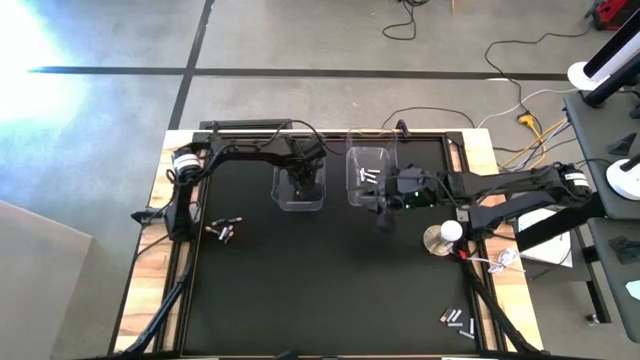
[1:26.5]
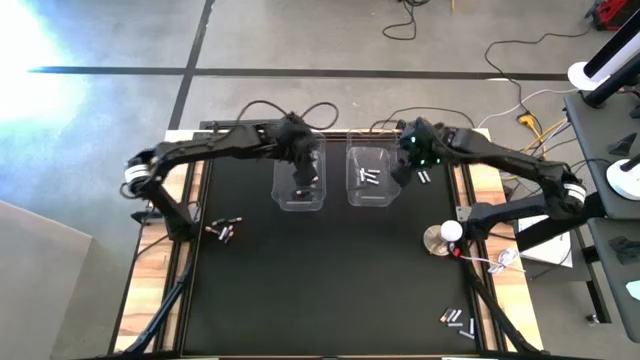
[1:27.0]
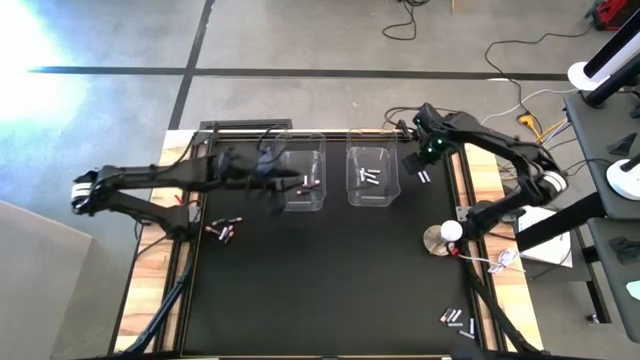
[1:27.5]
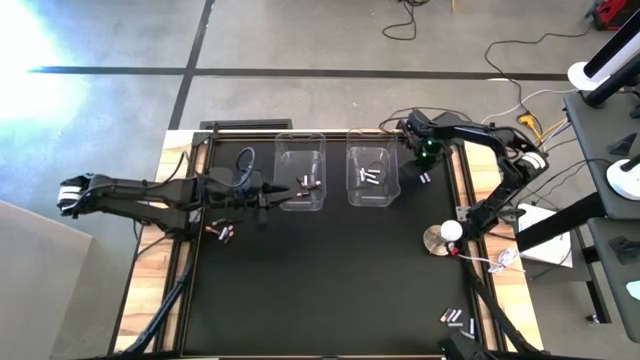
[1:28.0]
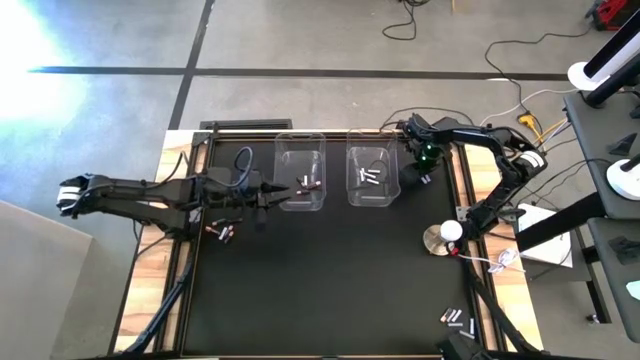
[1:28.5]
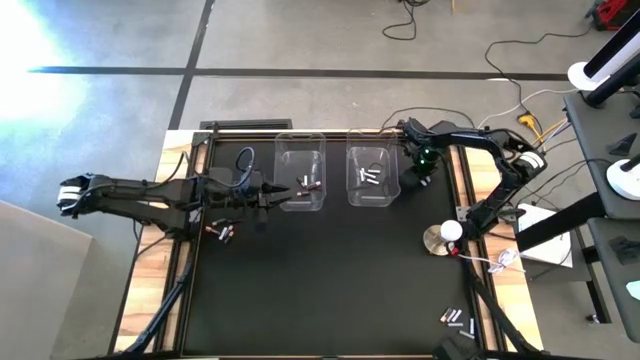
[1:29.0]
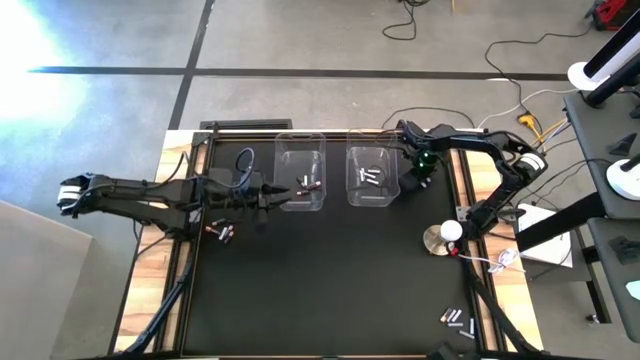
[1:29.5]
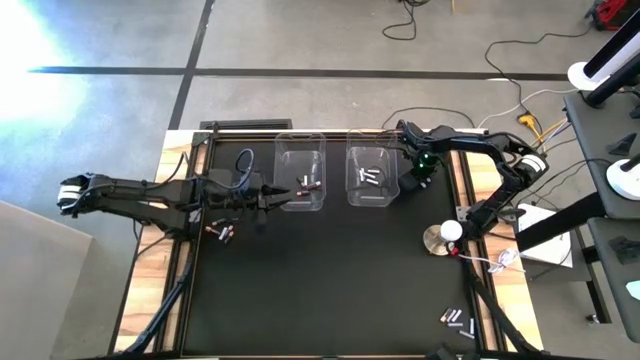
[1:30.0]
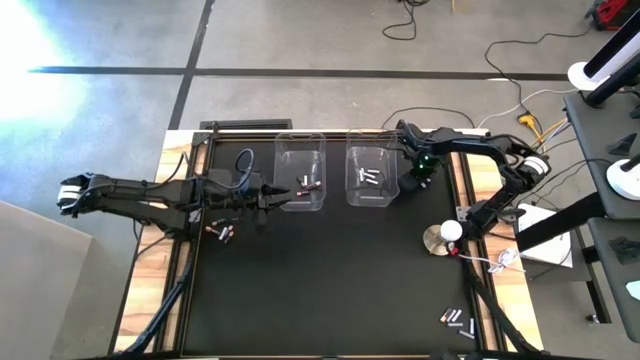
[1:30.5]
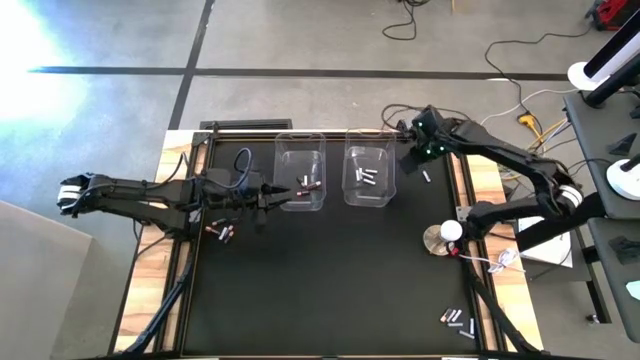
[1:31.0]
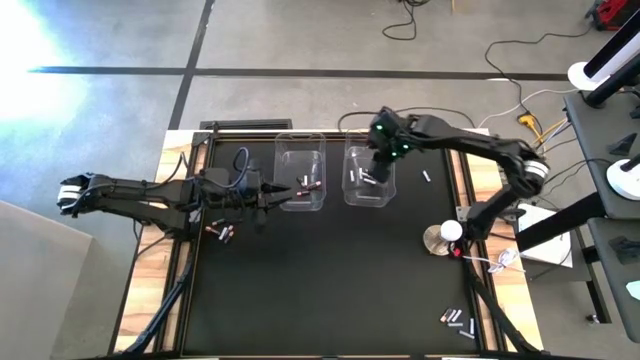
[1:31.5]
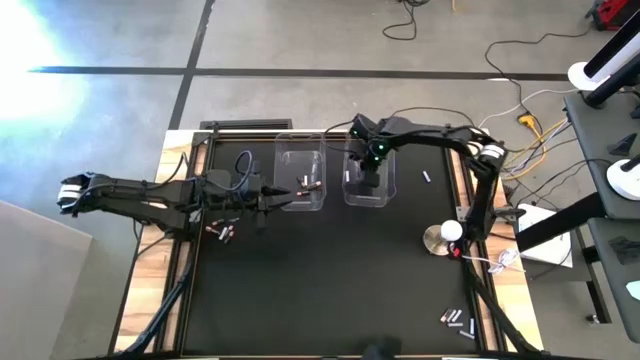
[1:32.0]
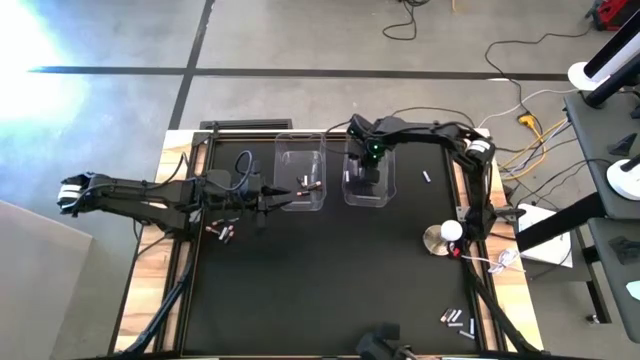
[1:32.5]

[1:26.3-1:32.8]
Task: Sort batteries
Put the white battery into the right transparent bin

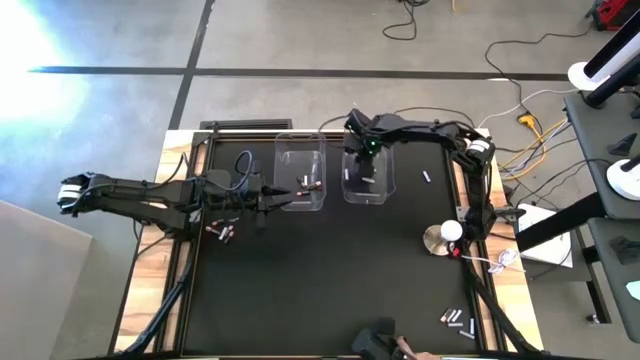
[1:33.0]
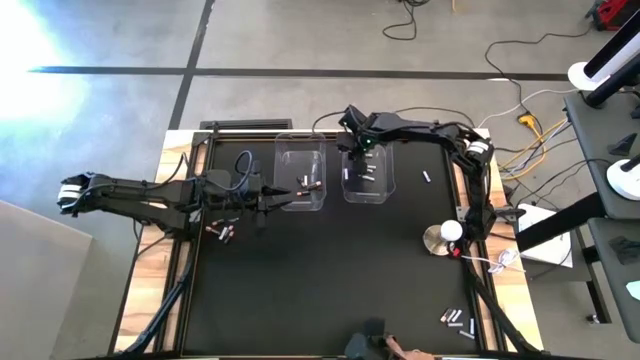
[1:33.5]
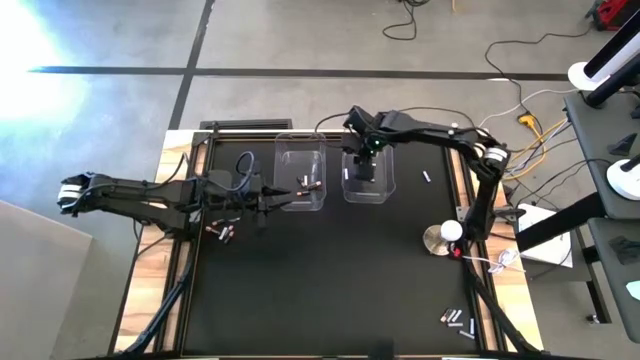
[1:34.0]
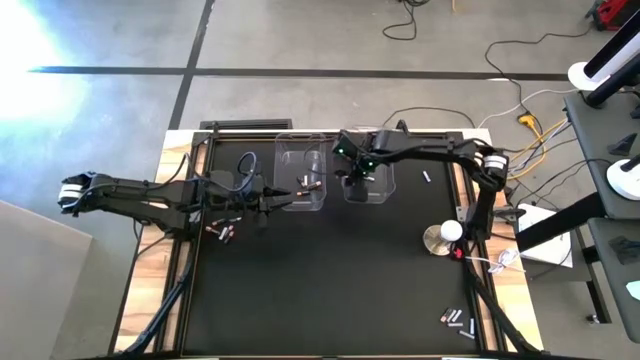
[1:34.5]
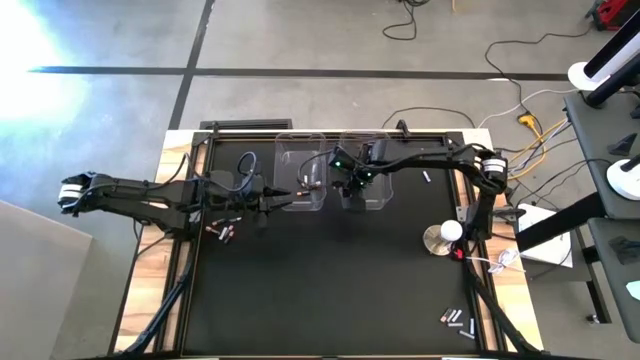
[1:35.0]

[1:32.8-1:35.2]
Adjust the right transparent bin

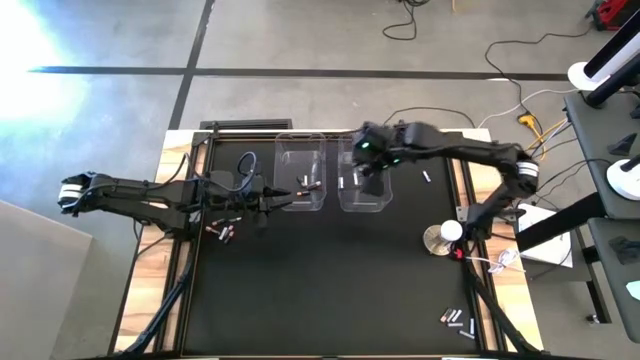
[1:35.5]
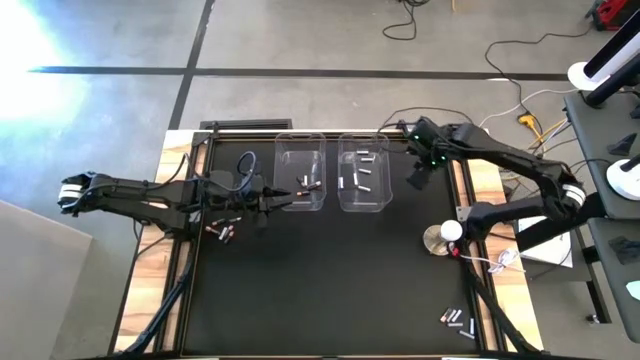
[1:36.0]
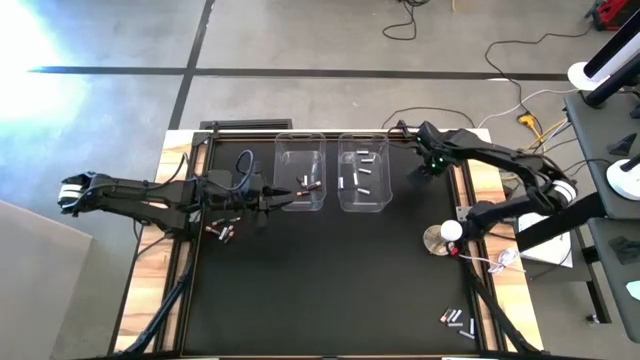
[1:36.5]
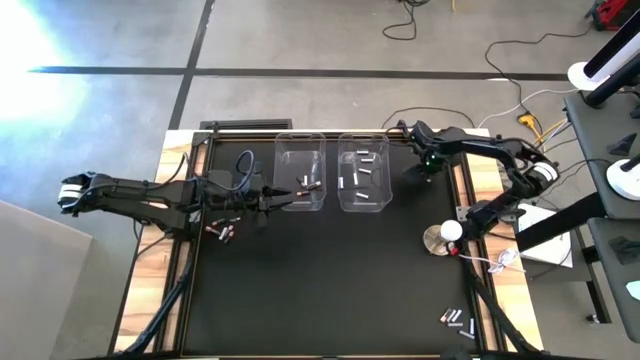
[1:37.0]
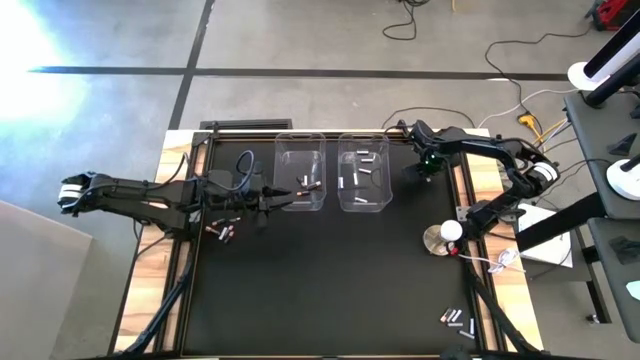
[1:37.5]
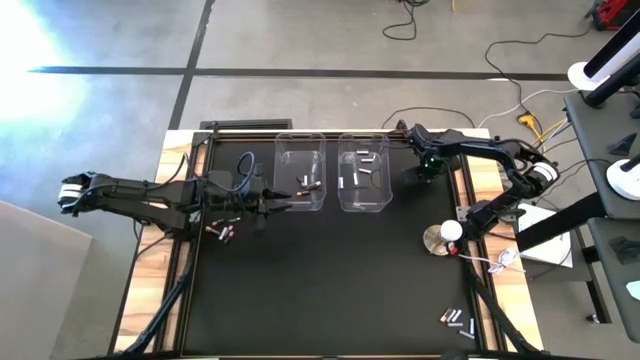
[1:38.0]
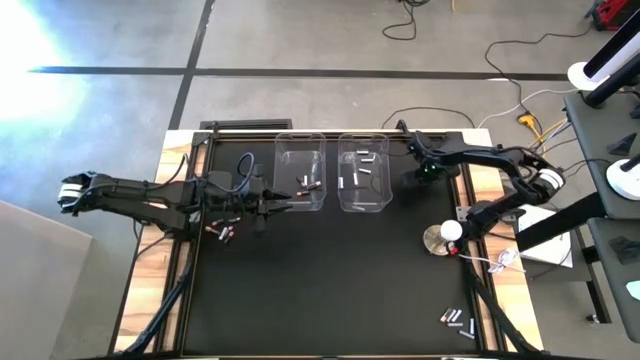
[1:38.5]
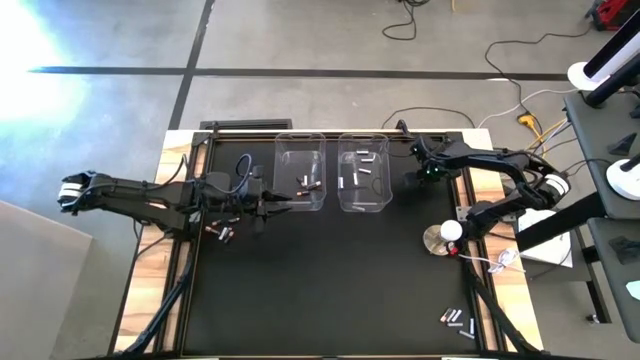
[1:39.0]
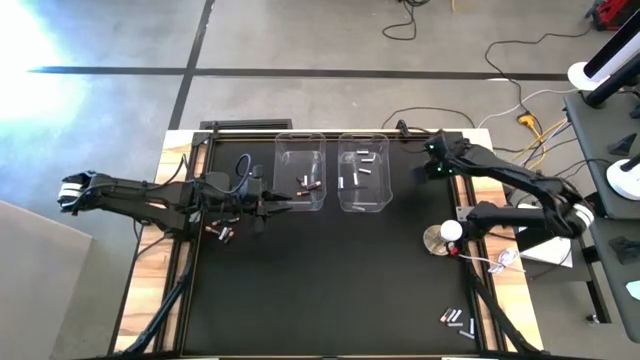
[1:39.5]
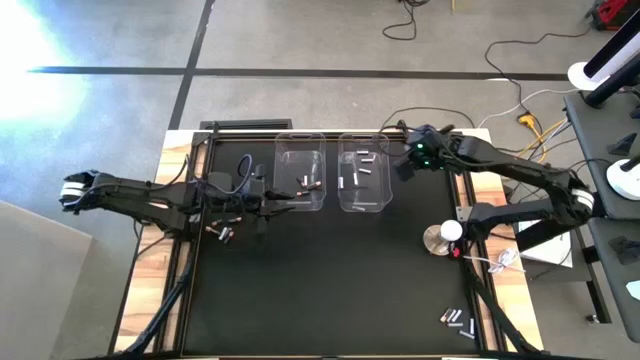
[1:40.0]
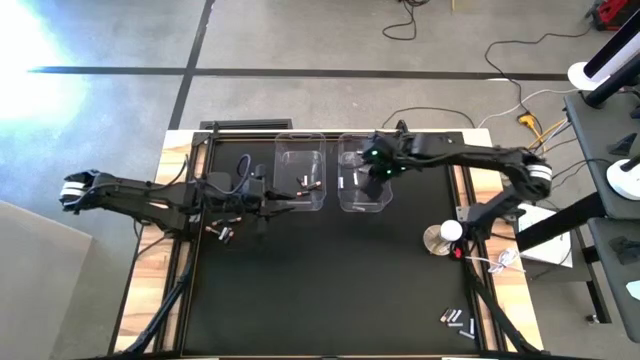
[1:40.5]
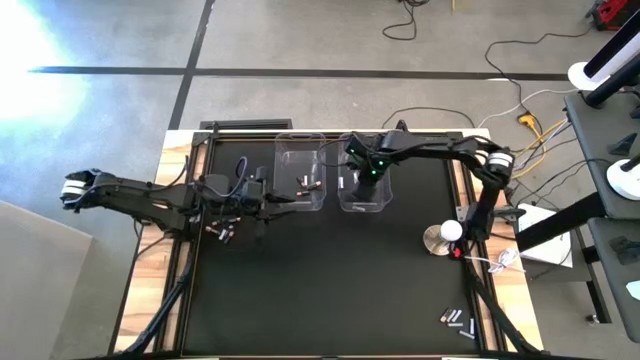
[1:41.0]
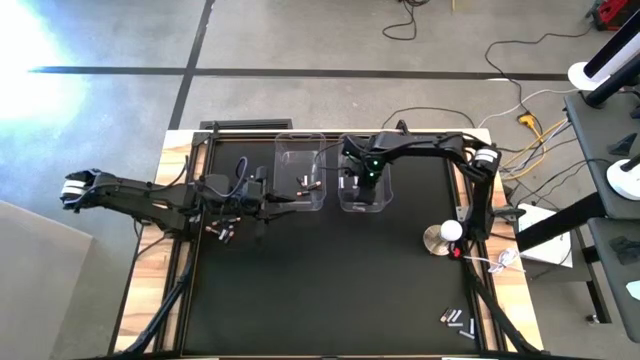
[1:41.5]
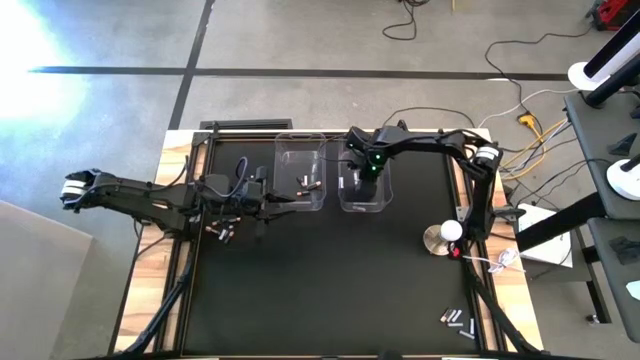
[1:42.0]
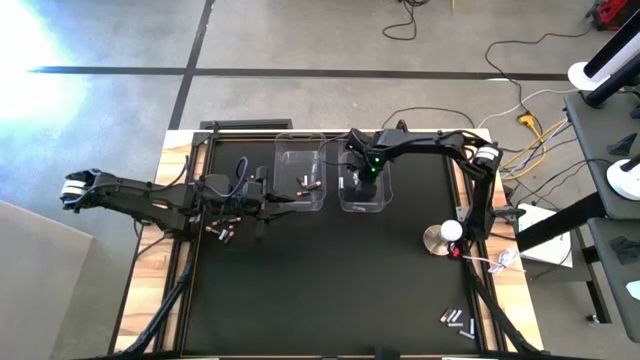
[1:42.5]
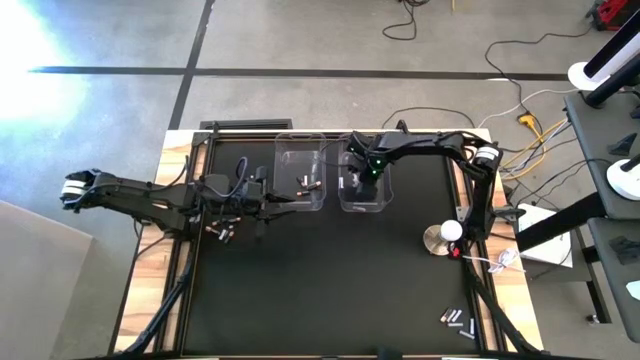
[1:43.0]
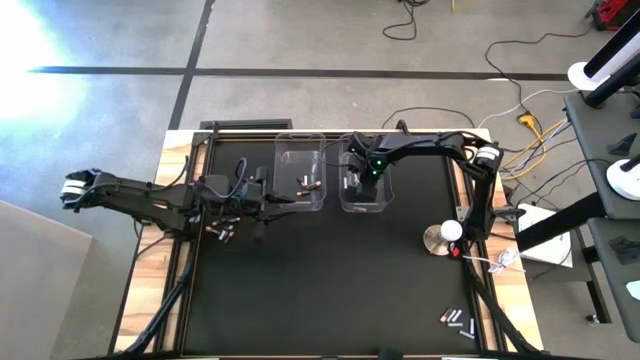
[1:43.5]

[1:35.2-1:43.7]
Put the white battery into the right transparent bin

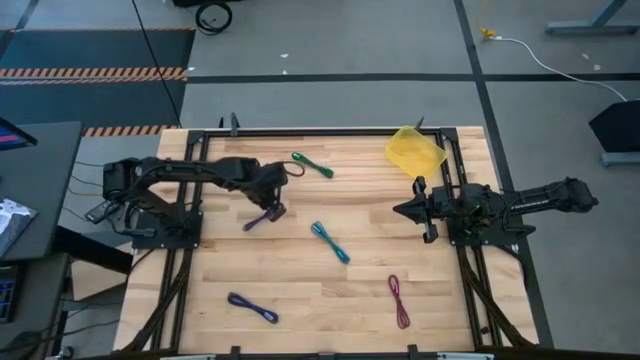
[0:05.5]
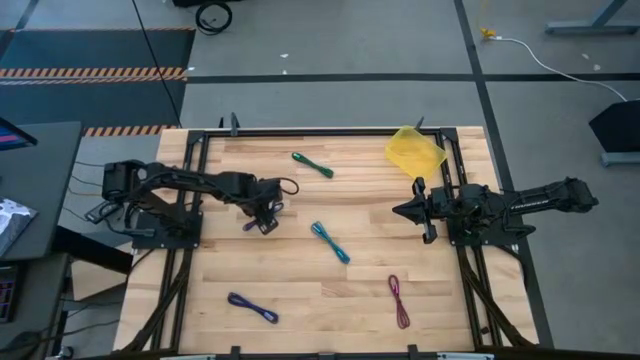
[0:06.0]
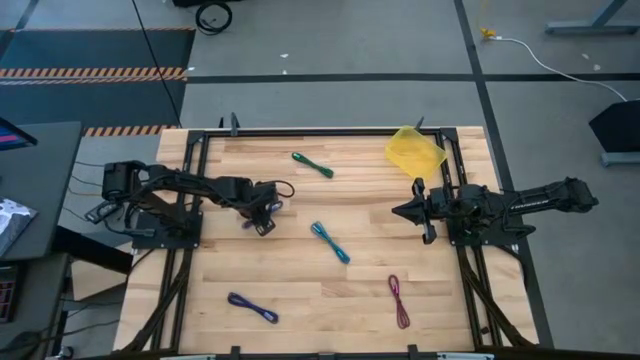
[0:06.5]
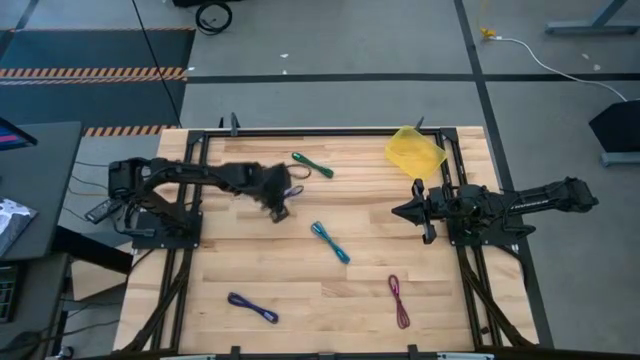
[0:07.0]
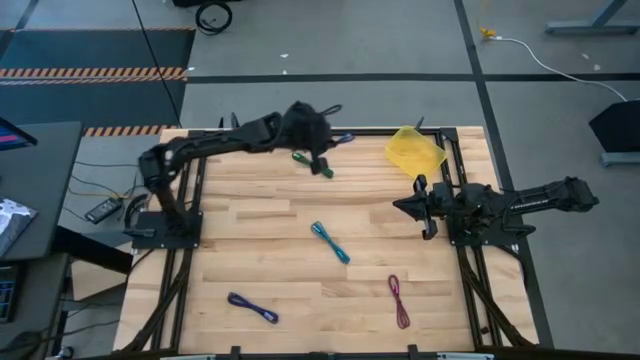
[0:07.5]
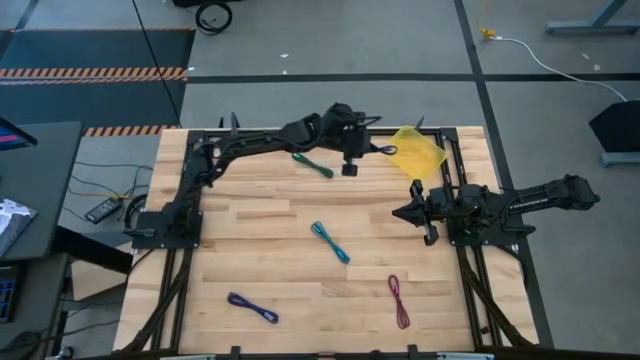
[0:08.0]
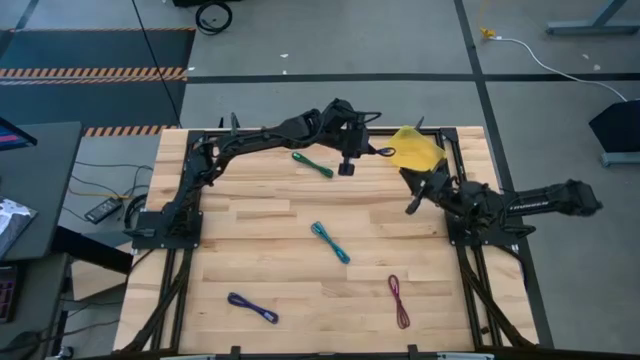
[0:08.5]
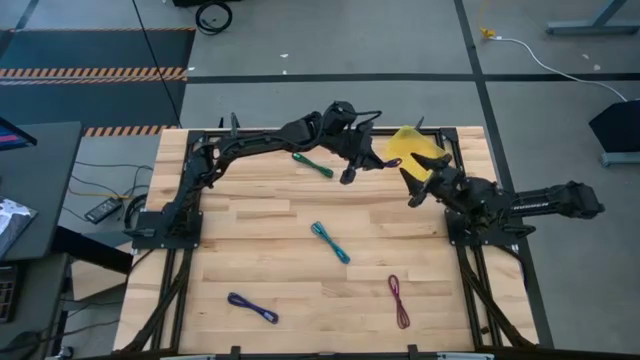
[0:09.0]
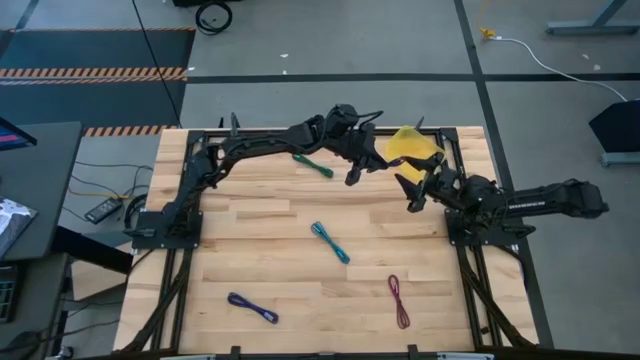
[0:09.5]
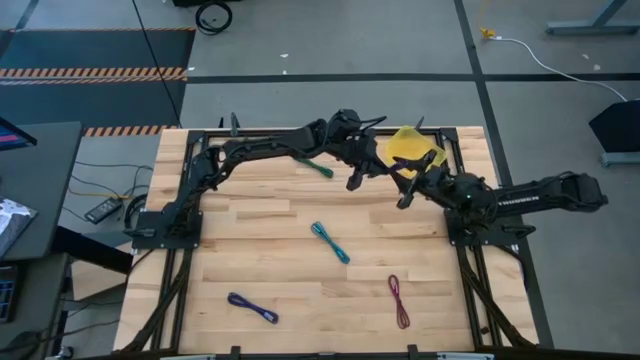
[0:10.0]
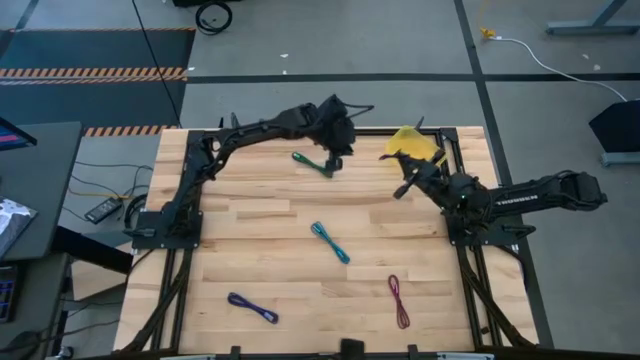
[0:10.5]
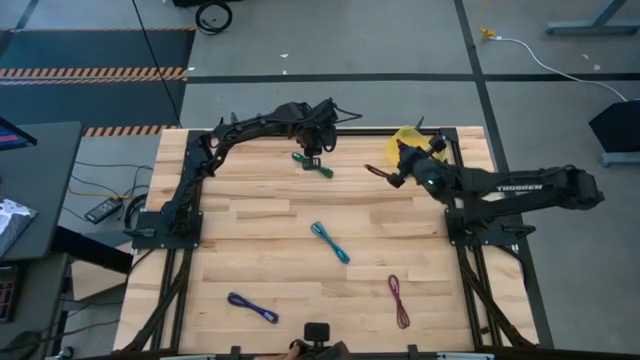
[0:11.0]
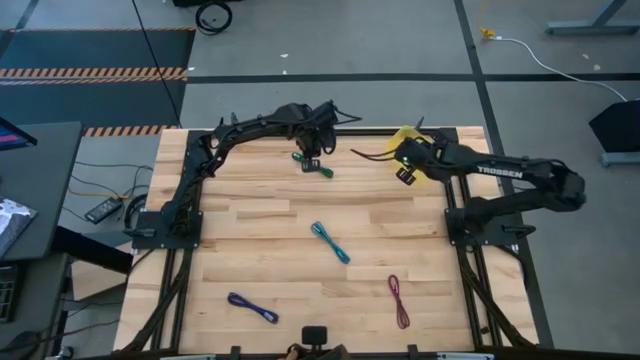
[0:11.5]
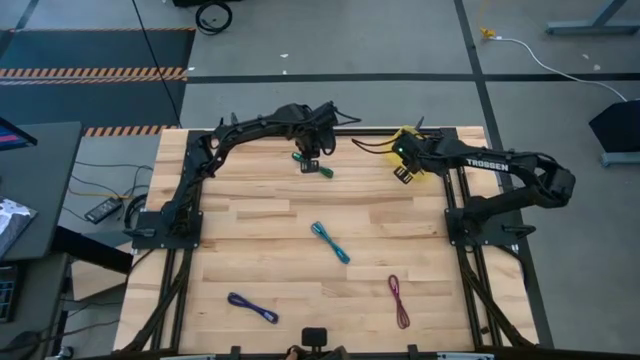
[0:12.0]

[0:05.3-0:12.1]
Task: Pick and place USB-C Cables
Put the violet charger cable into the yellow container
